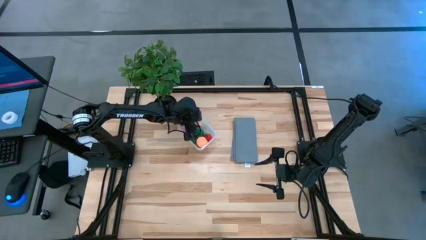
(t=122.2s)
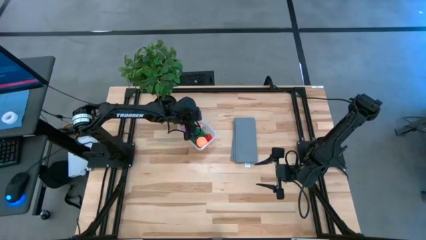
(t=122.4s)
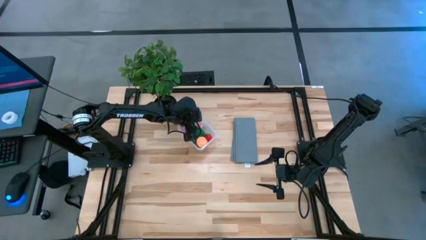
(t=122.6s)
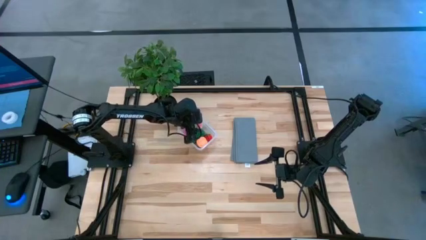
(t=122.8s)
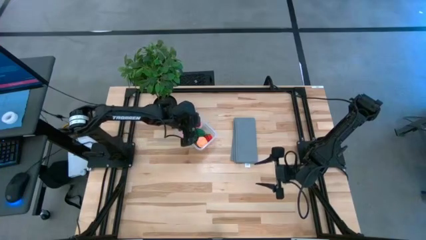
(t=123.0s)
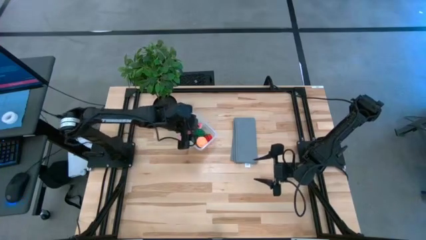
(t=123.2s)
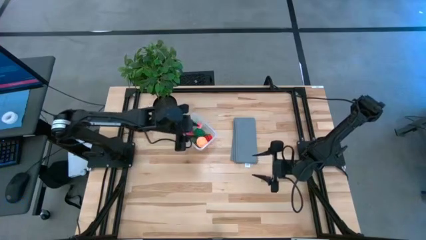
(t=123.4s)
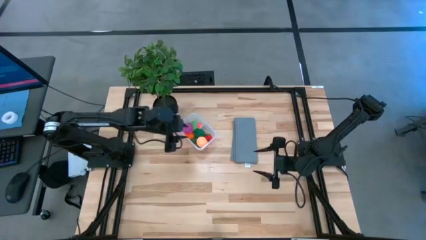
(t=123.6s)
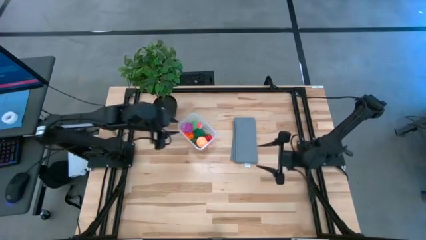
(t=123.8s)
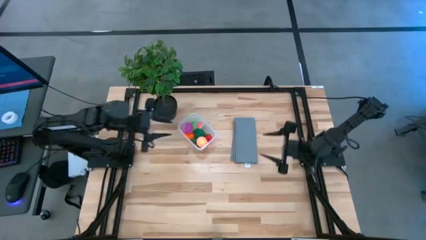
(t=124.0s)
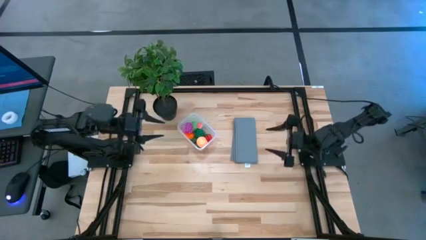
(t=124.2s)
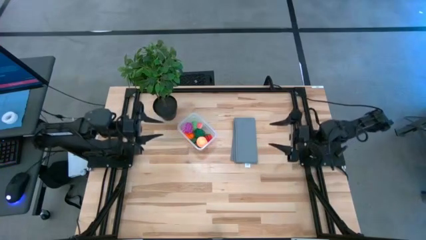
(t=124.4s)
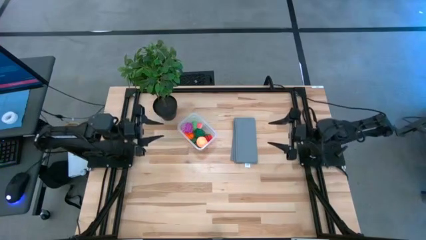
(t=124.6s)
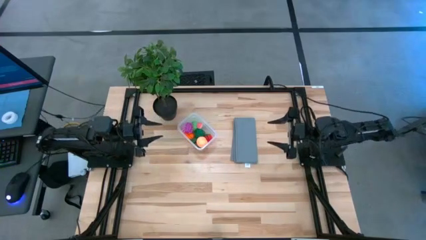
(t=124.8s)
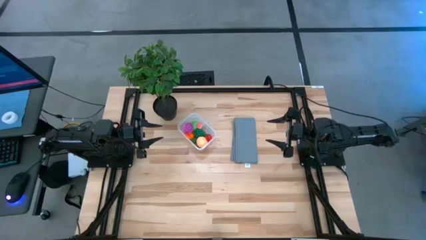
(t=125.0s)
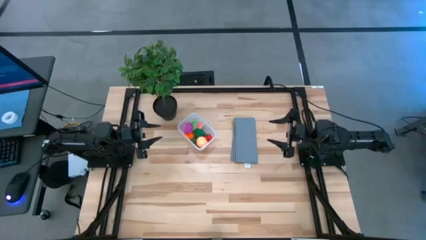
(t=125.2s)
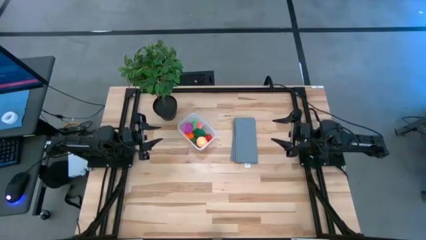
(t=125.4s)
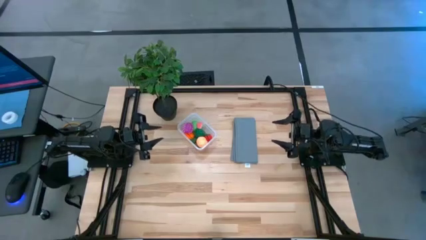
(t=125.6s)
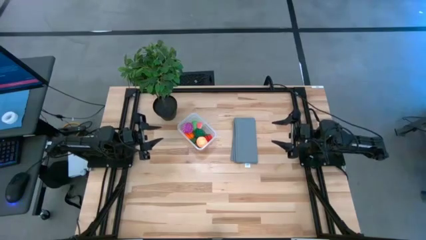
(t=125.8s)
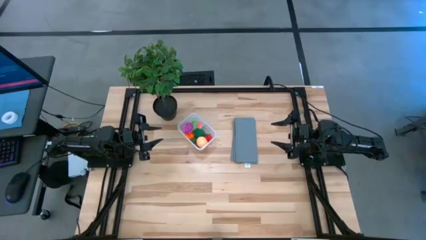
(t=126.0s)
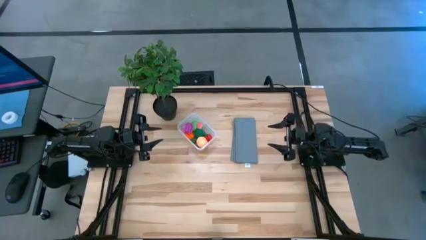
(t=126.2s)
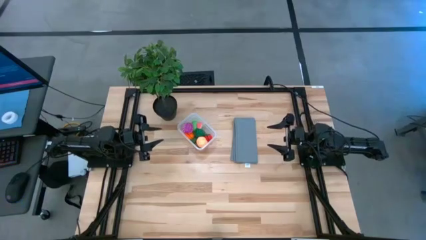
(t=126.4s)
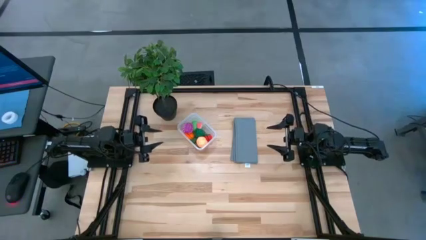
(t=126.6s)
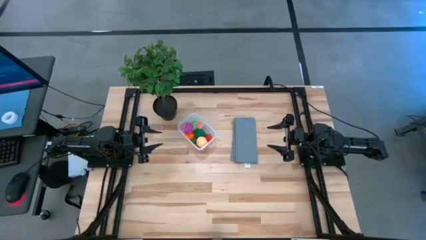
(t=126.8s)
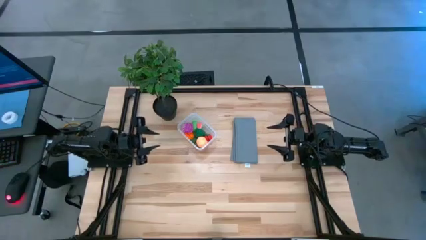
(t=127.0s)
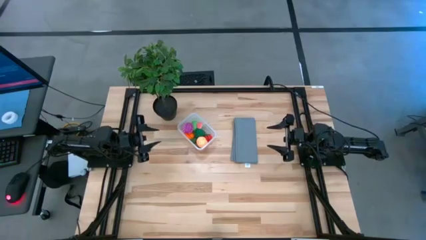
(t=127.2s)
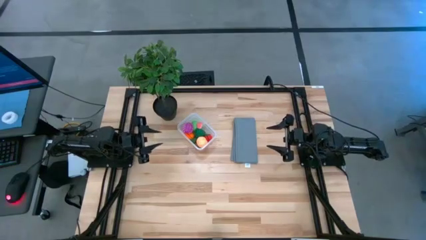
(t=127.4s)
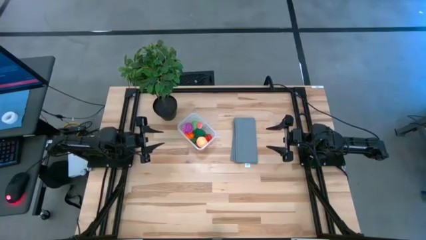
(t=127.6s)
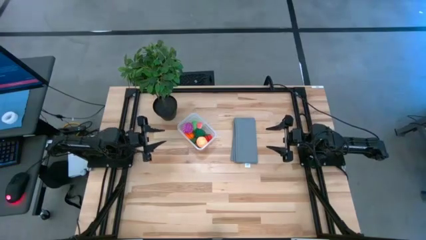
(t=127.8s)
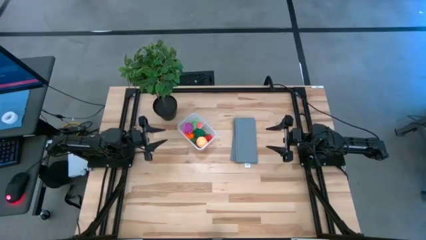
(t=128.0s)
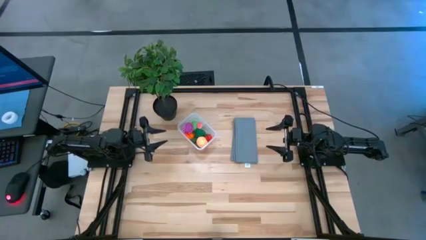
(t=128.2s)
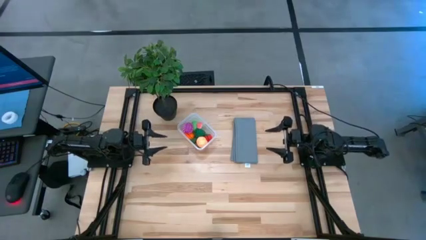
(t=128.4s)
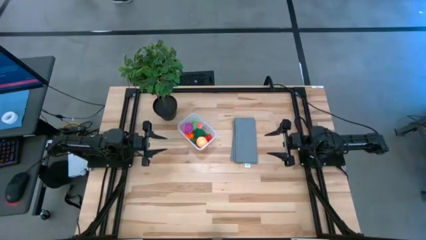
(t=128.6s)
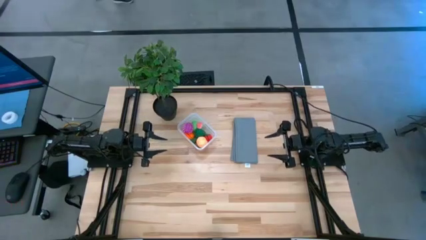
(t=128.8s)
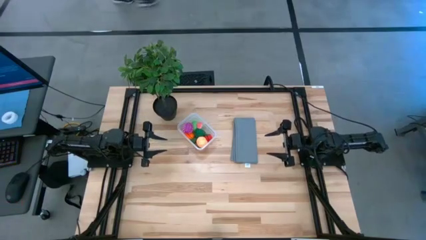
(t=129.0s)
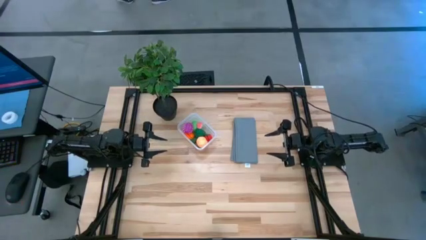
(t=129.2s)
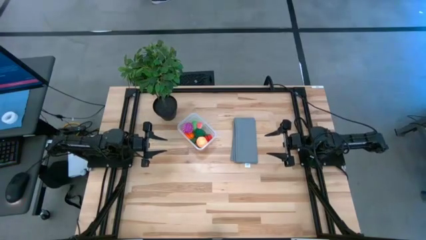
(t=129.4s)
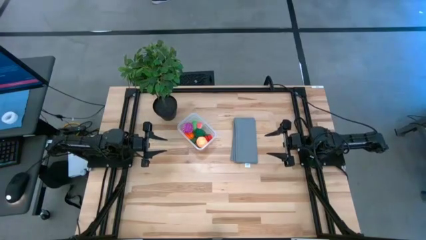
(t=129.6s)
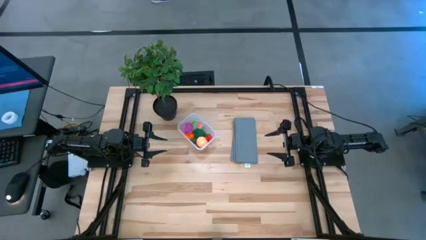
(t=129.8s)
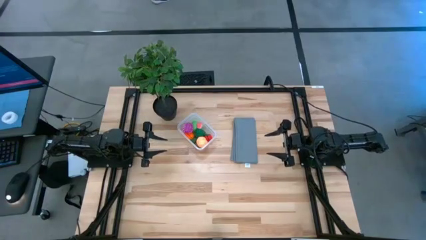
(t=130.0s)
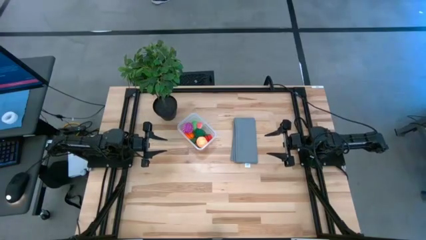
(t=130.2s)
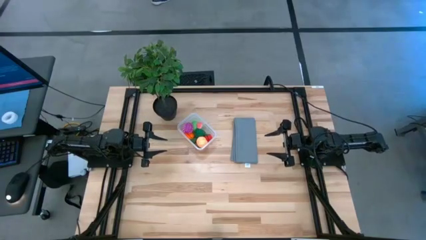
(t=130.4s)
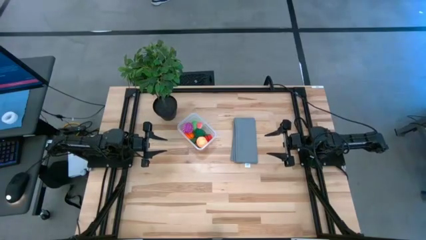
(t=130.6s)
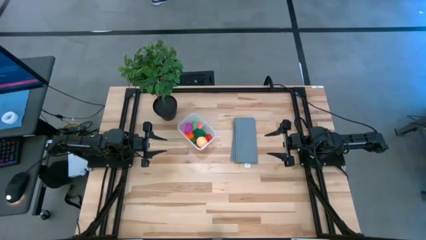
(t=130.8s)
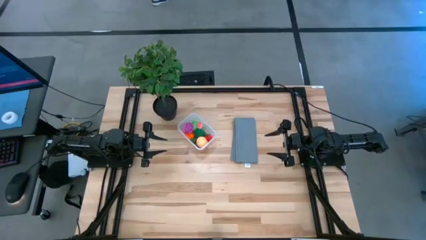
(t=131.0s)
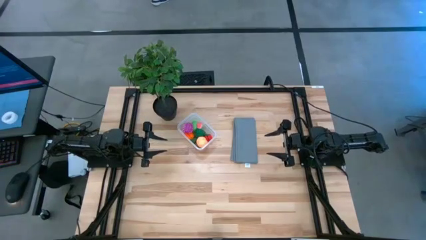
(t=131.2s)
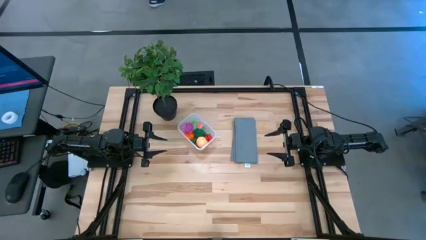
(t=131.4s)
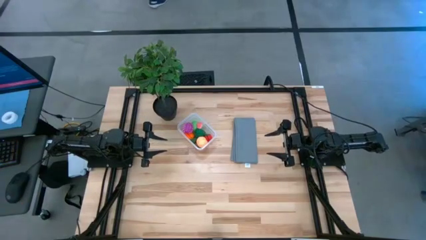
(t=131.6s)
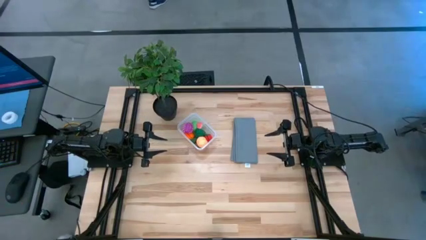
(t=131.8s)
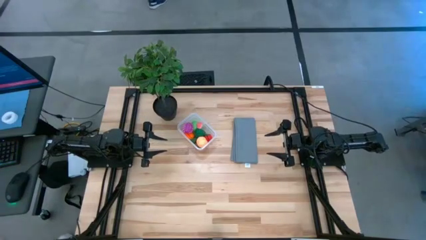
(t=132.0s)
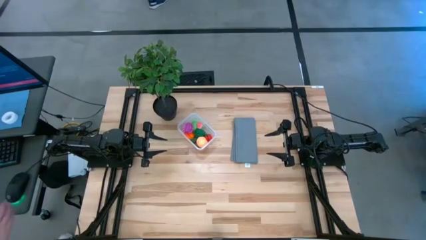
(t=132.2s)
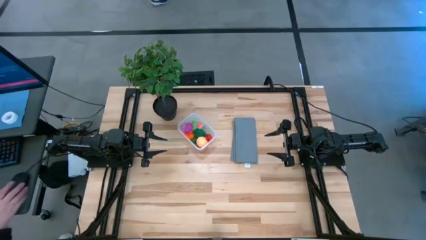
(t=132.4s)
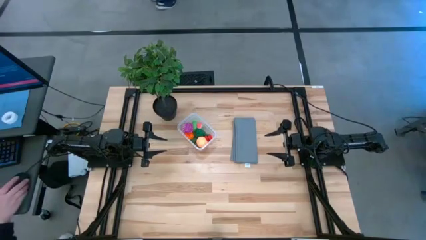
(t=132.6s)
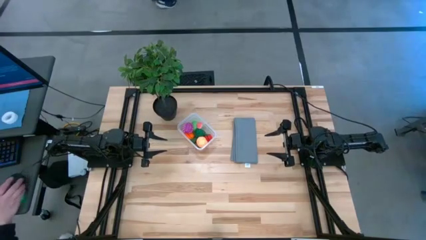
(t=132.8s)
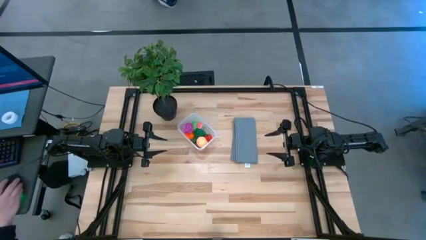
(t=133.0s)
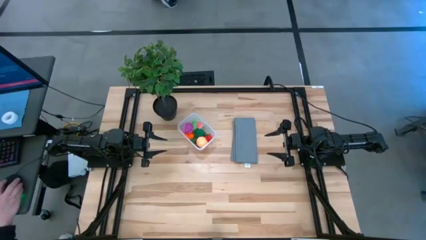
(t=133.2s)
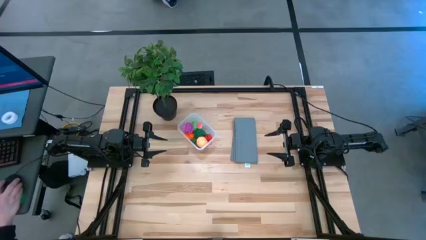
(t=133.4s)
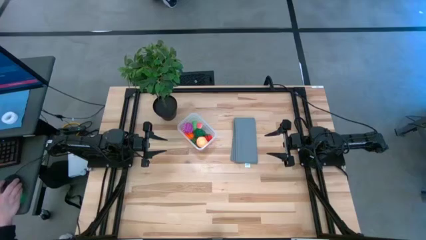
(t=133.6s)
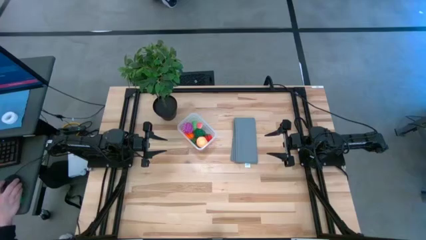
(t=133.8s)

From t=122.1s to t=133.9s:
Task: Pick and placing Produce into tupperware
Return to Home Position

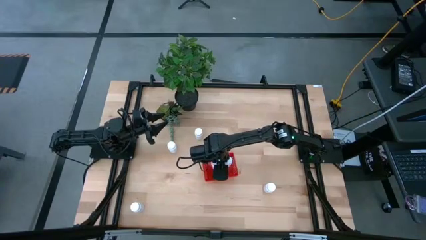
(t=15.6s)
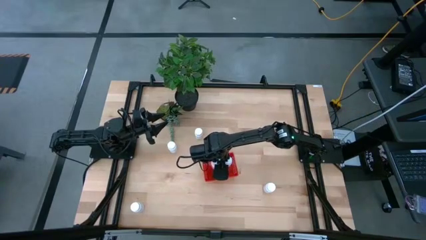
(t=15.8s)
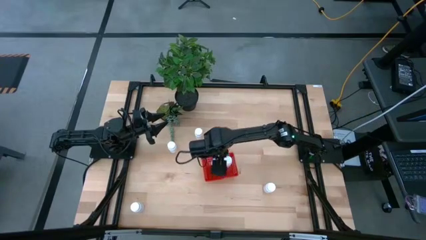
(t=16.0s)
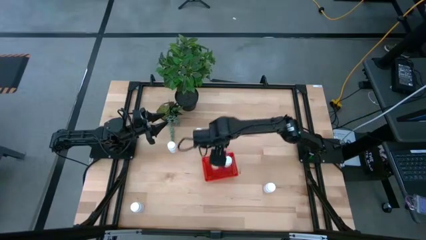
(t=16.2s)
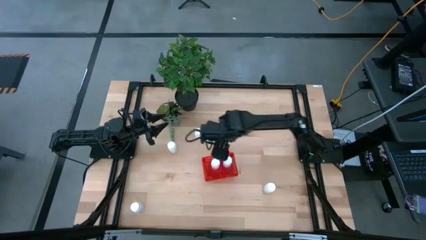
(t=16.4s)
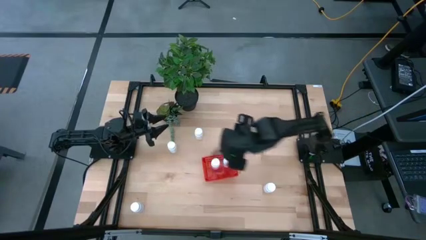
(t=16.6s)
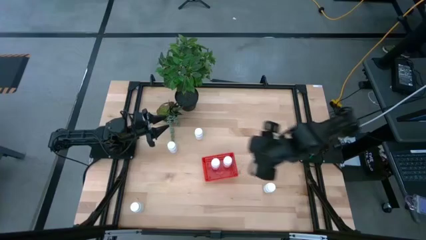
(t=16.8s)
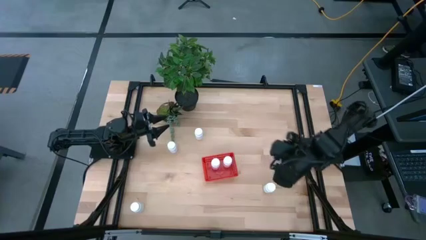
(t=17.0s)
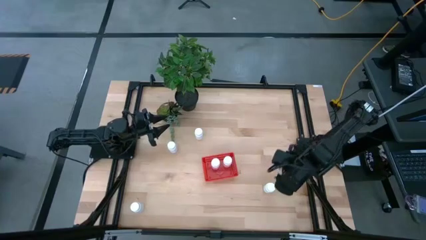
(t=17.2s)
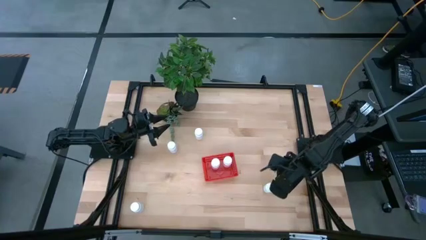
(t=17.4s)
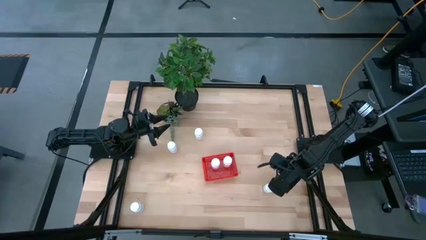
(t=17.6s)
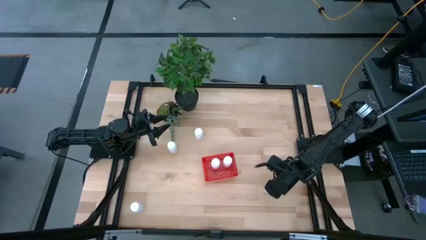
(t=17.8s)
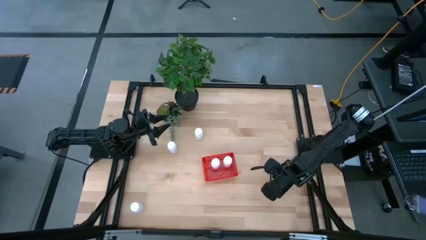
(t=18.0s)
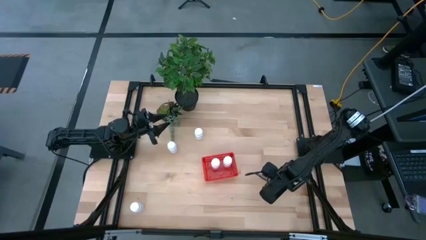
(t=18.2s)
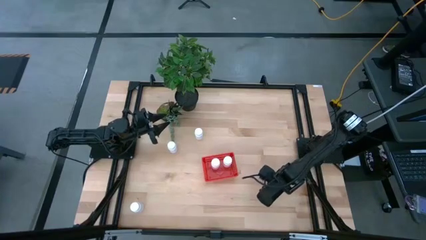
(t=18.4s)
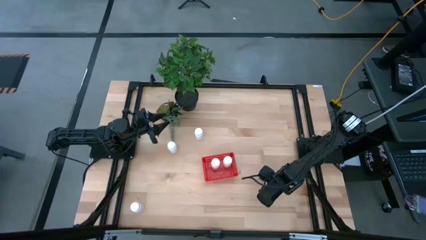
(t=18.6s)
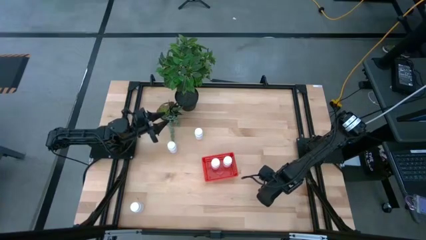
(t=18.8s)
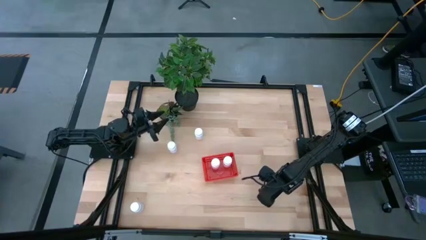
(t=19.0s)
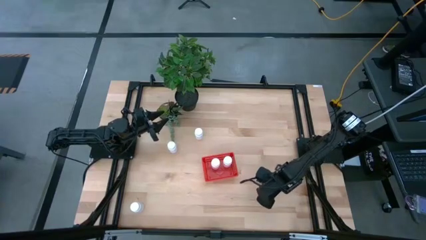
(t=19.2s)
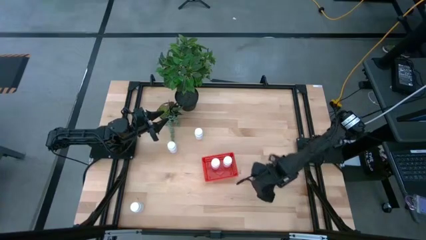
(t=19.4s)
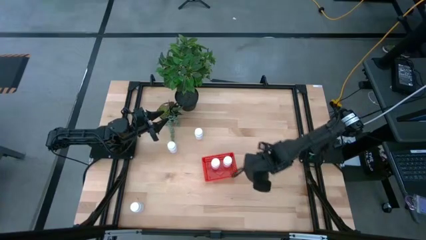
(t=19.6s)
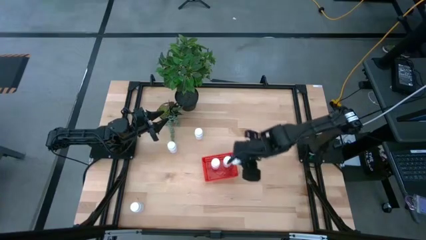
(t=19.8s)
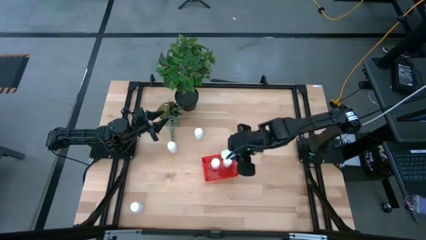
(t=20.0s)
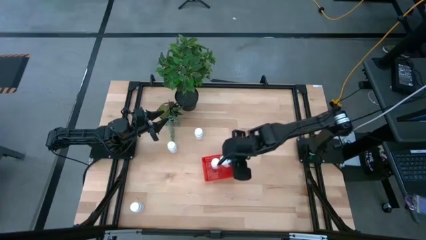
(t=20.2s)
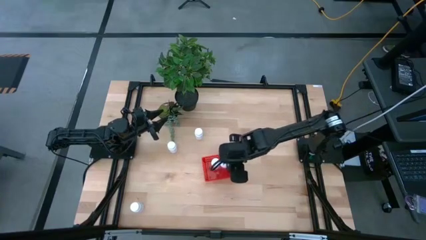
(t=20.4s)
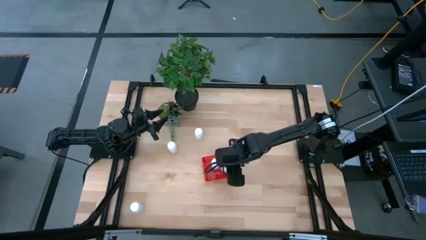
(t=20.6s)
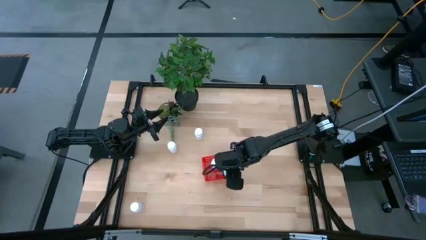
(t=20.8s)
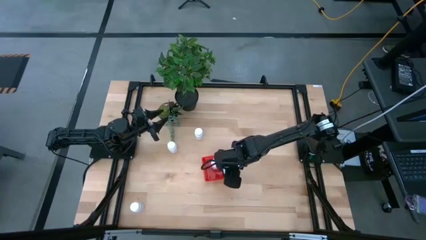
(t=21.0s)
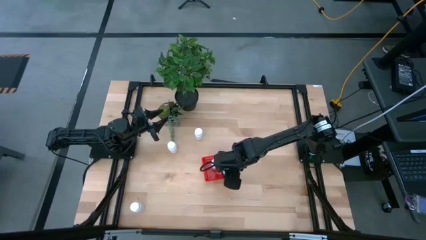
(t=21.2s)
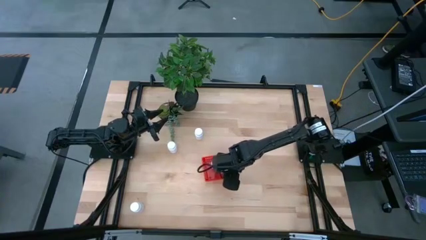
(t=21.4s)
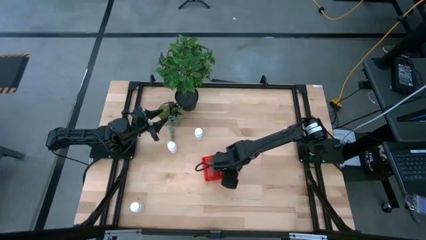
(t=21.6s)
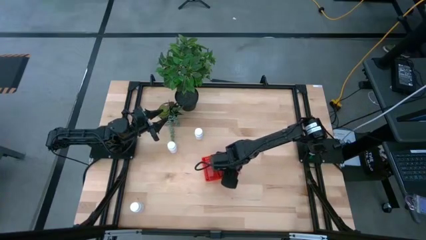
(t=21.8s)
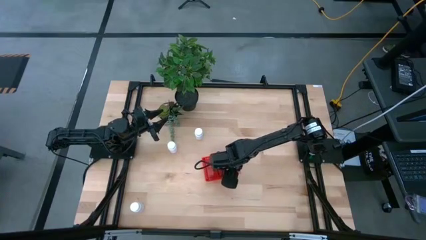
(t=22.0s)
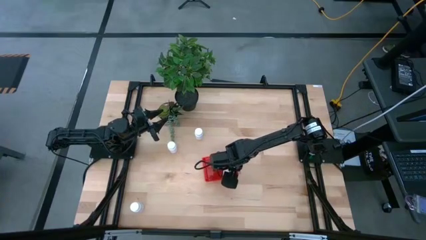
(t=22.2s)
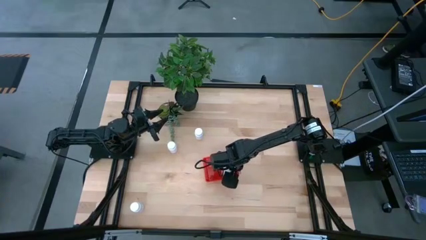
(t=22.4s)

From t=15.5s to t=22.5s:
Task: Pick and place pill bottles into a basket
Put the white pill bottles into the red bin
